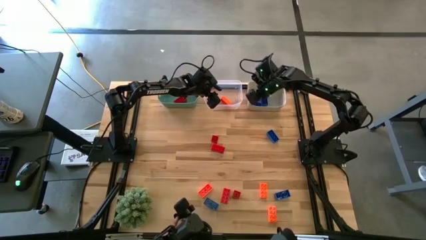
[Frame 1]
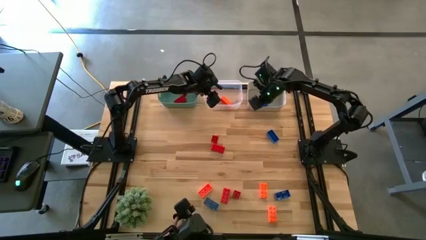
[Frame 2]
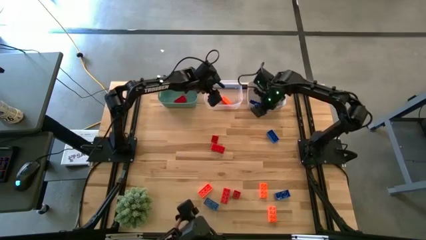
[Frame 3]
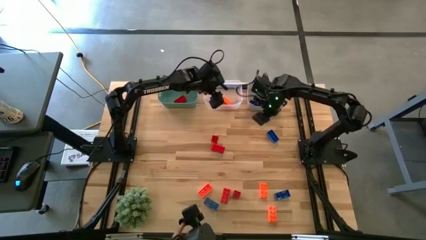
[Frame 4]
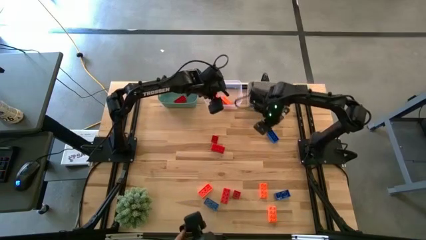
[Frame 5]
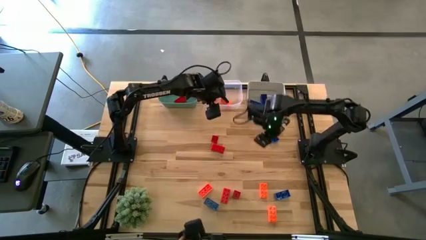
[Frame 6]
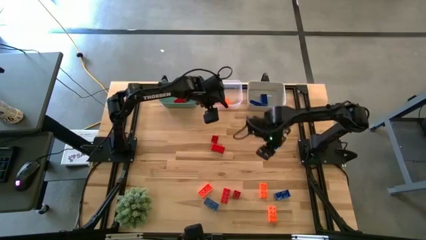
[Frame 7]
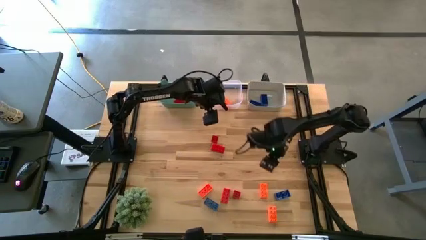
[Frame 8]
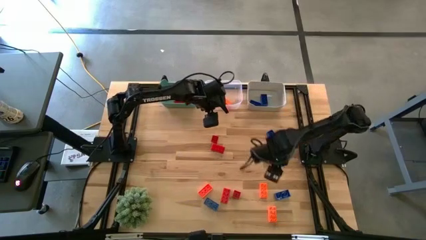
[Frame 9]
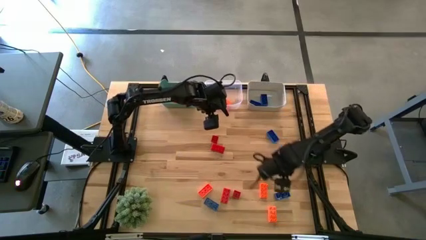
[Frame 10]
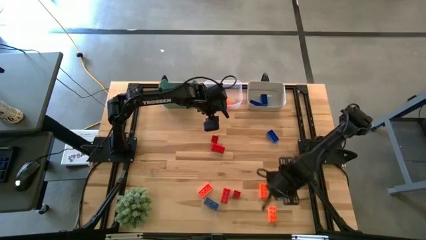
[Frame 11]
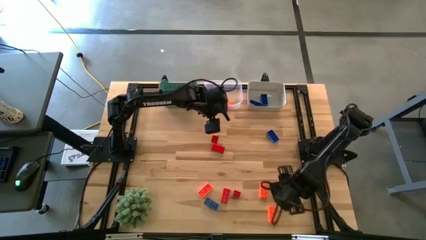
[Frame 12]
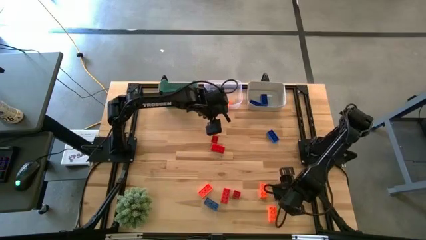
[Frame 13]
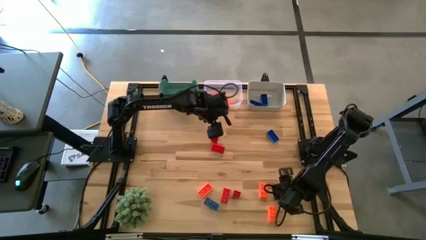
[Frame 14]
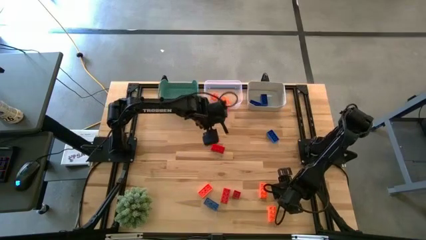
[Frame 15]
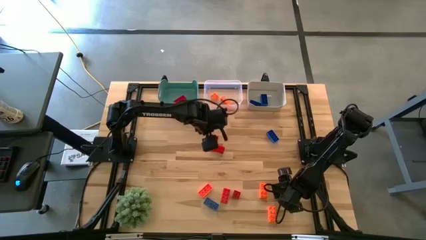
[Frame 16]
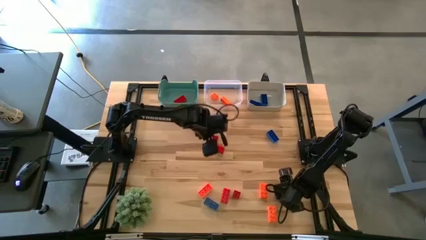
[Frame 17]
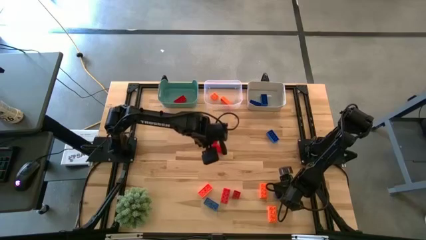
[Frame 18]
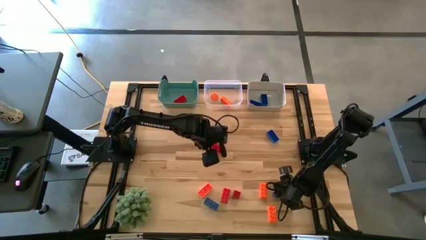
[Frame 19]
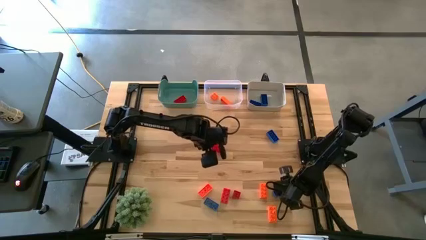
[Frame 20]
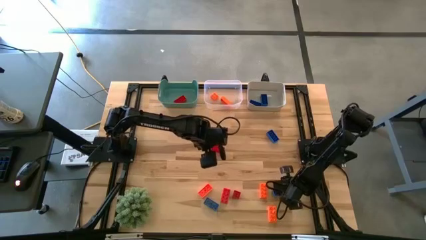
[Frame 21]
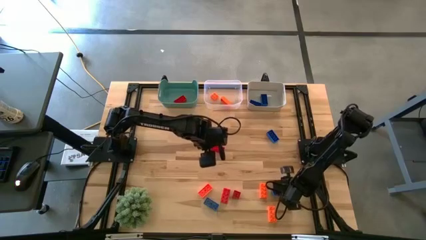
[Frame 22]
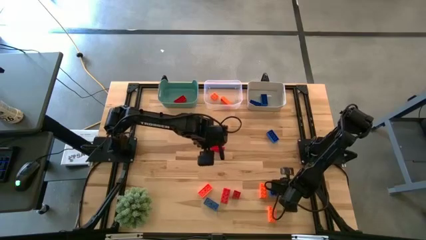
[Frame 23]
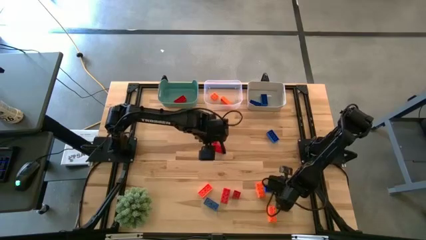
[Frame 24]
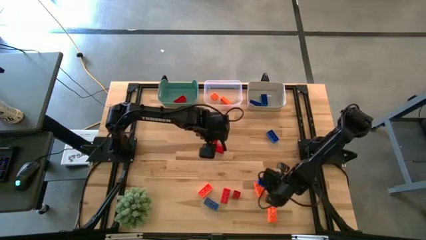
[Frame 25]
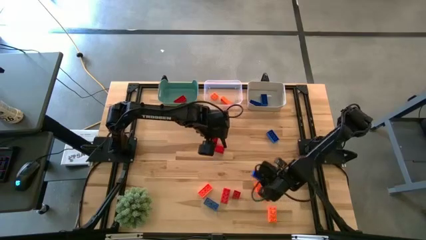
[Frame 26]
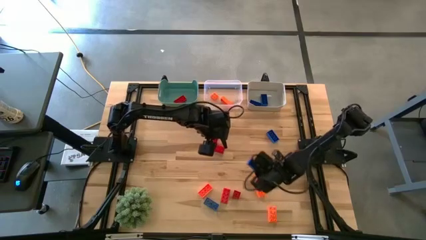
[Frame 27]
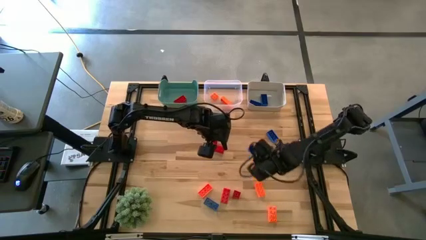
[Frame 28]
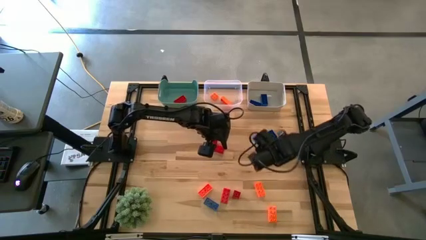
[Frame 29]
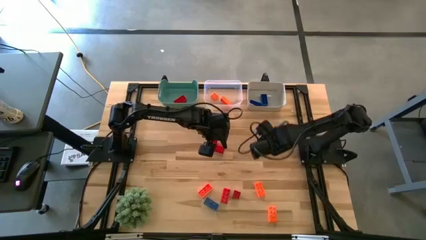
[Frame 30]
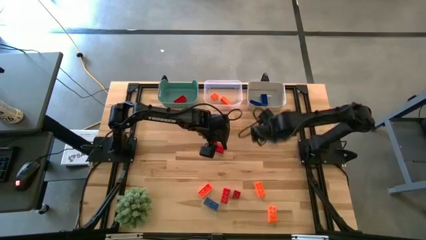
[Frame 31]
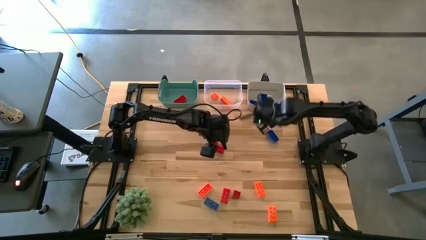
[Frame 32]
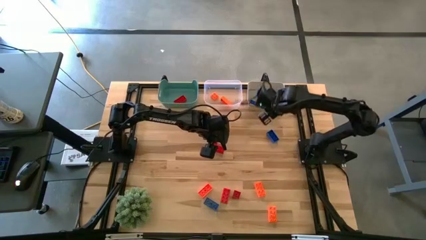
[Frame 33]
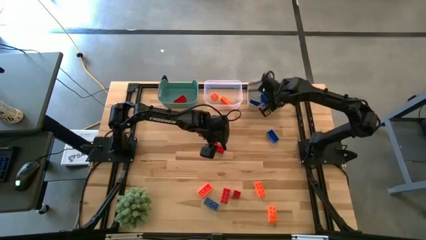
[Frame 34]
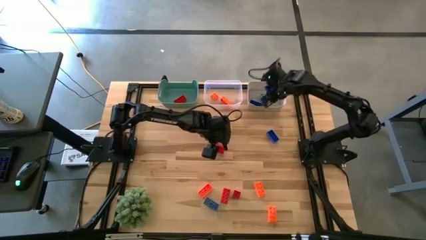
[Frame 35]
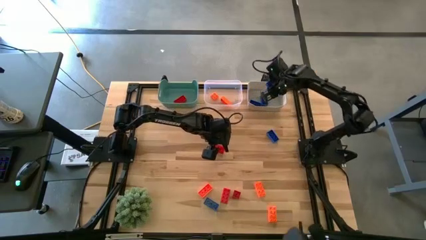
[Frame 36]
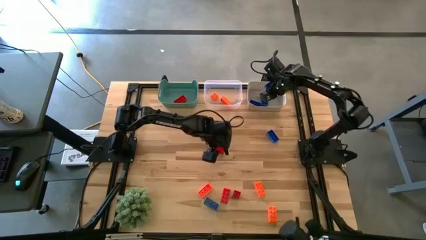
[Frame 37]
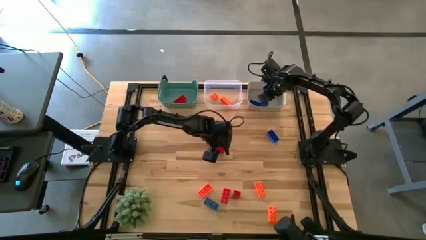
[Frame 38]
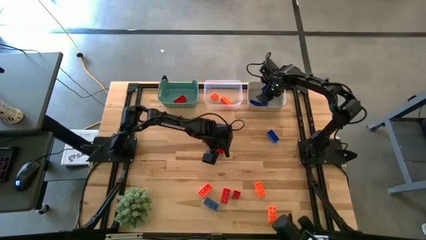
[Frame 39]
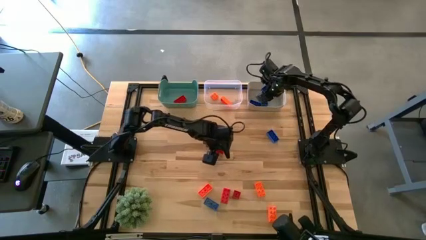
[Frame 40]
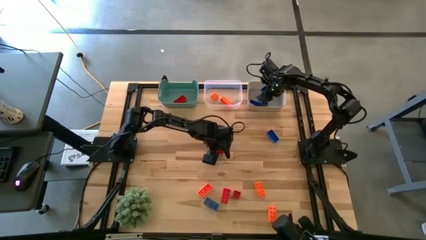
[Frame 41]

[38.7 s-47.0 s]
Task: Sort & place blocks by color
Put the blue game piece into the white bin

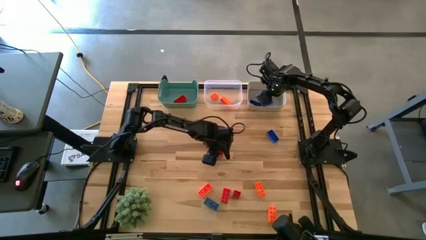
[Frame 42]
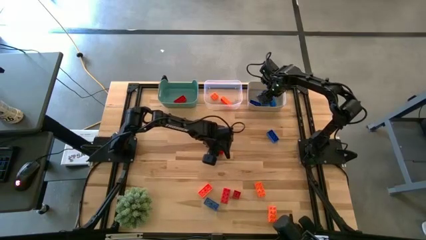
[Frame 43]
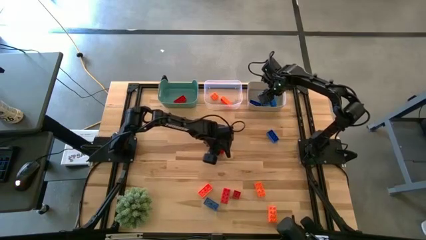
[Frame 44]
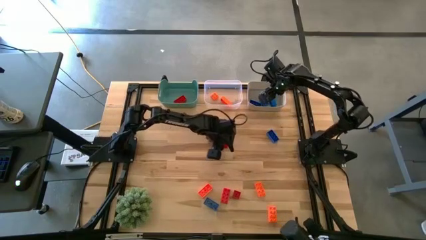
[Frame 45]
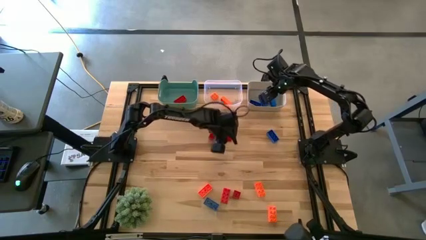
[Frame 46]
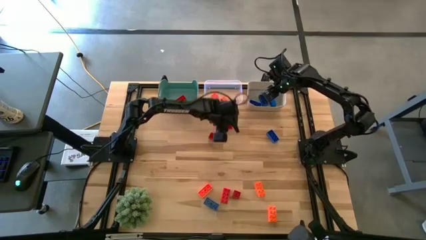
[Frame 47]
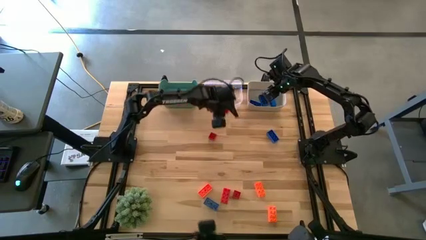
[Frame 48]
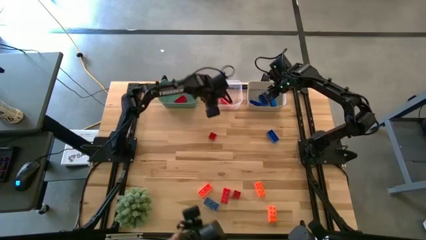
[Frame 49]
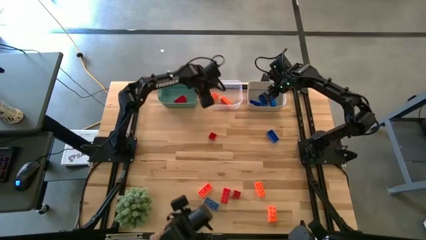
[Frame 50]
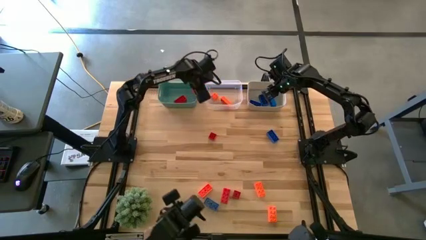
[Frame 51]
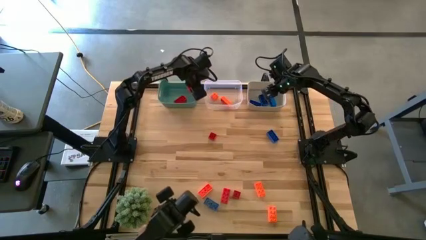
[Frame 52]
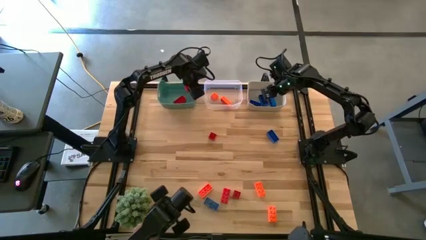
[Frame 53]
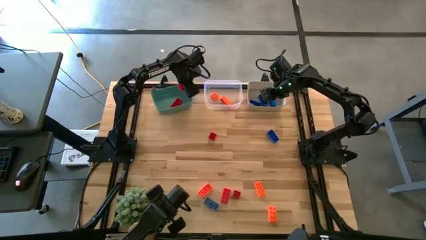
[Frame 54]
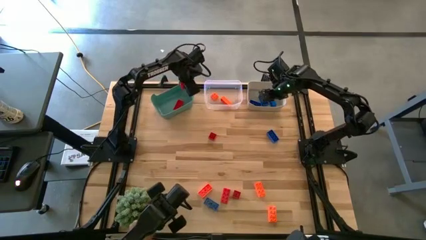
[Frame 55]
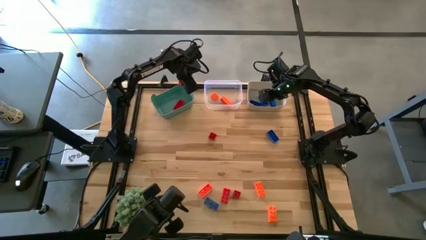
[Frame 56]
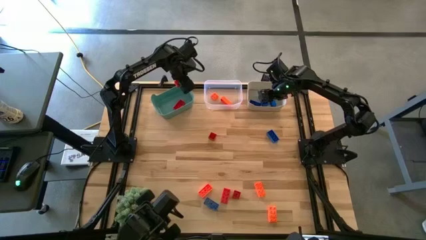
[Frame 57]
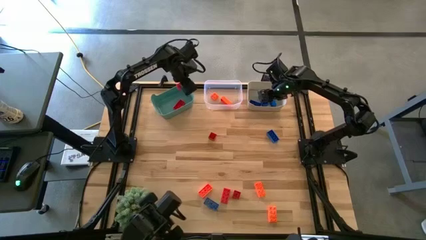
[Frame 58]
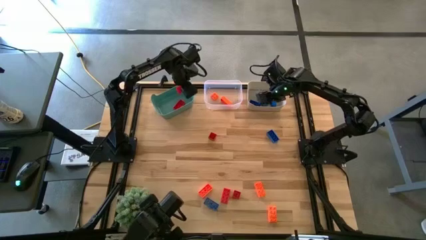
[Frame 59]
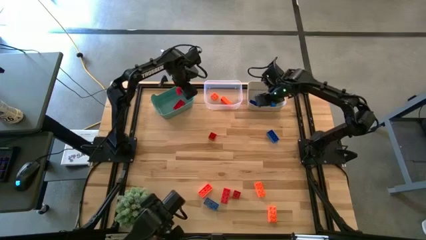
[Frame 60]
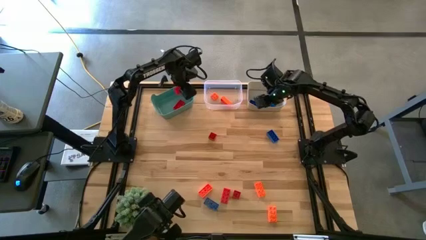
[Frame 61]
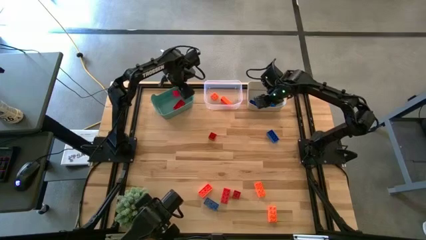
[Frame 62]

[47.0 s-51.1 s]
Put the red game piece into the blue bin

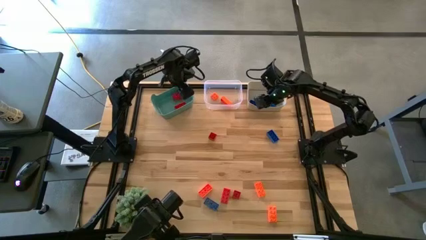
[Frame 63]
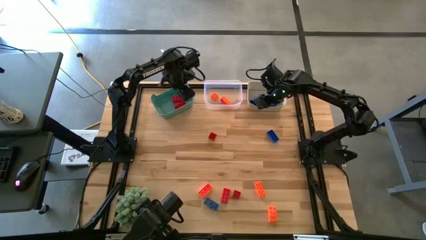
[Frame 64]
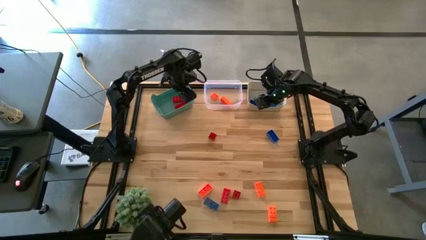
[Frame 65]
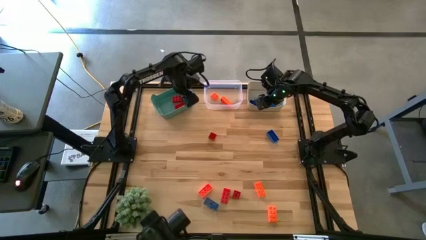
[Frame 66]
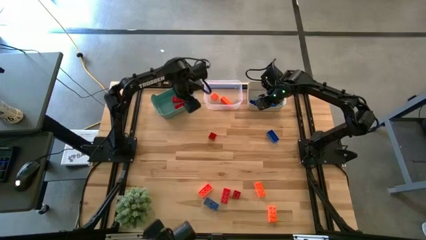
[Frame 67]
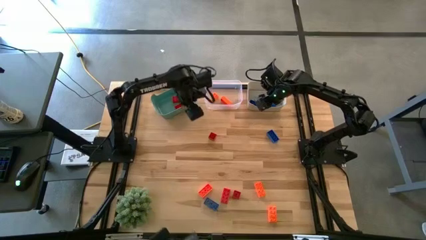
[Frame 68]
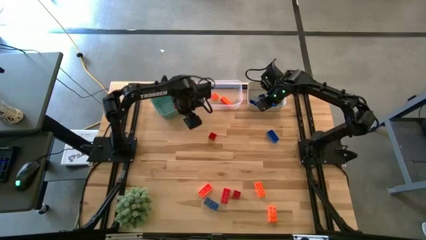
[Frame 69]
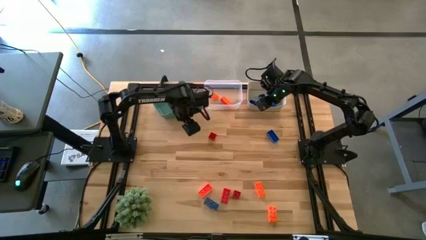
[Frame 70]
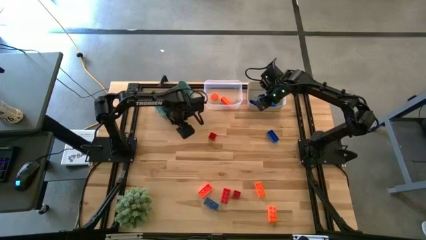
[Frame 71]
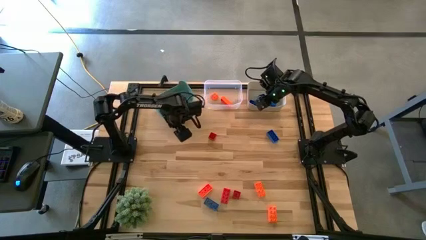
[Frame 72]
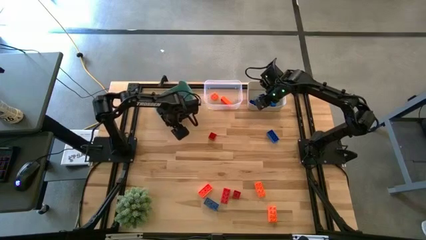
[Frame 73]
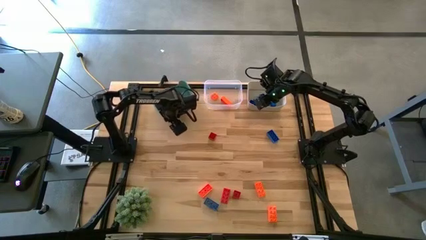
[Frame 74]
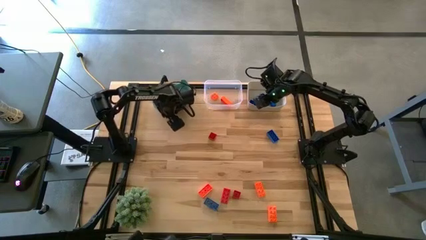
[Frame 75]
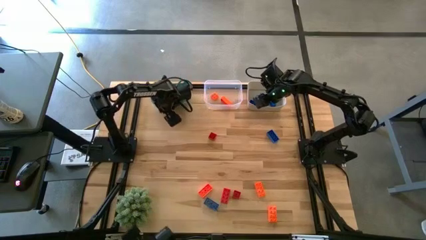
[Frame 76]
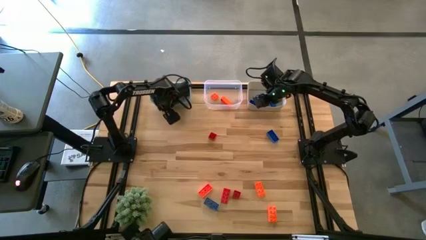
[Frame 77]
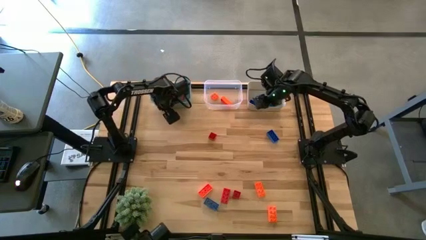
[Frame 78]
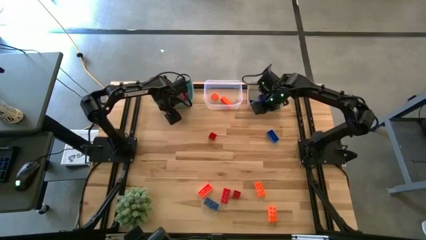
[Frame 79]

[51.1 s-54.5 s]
Adjust the blue bin
